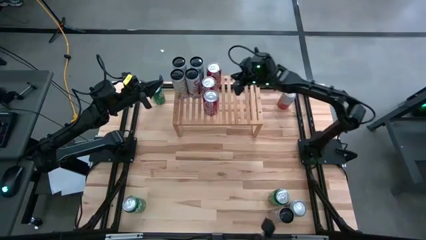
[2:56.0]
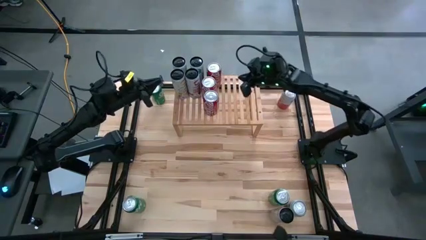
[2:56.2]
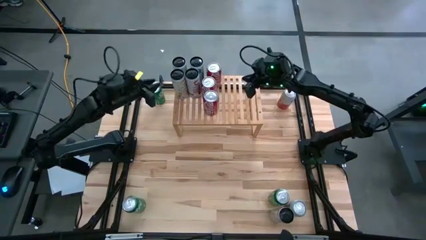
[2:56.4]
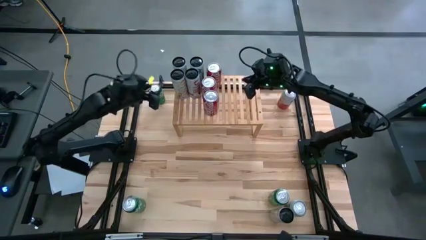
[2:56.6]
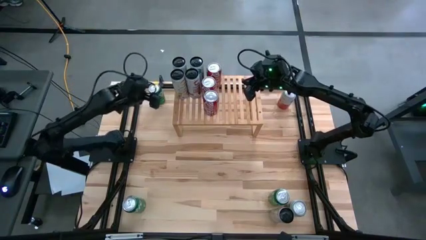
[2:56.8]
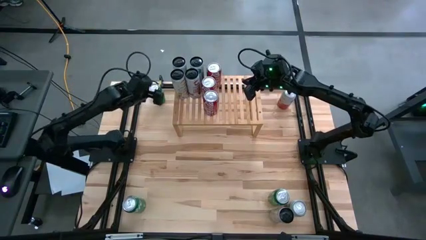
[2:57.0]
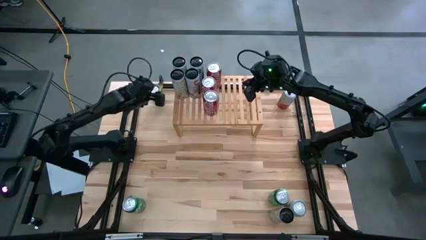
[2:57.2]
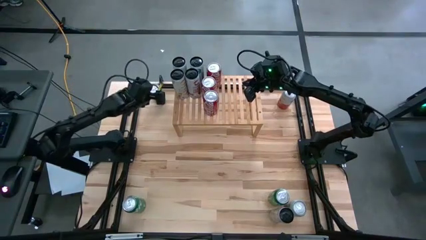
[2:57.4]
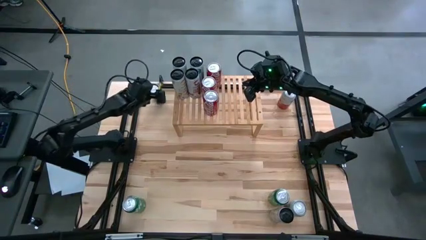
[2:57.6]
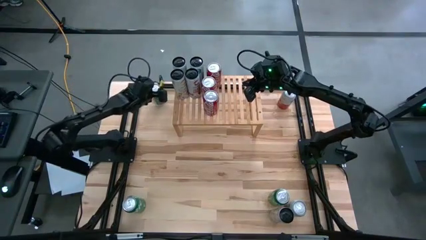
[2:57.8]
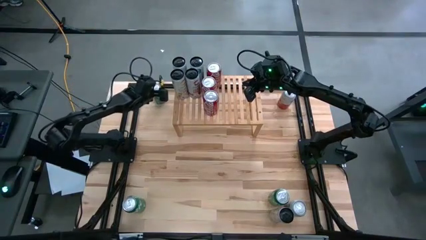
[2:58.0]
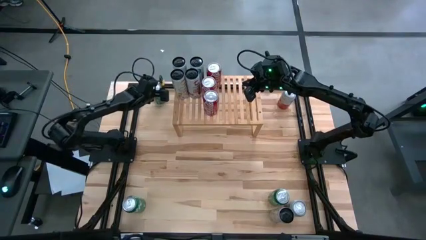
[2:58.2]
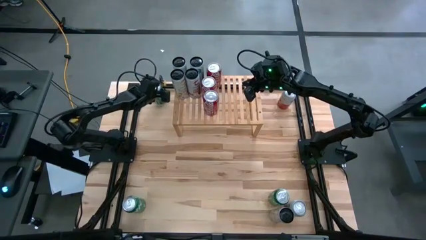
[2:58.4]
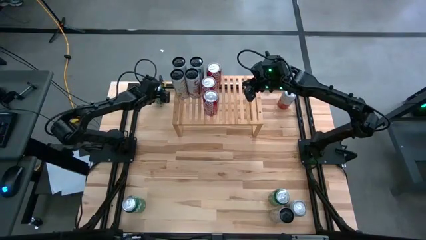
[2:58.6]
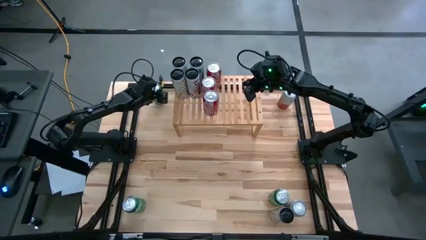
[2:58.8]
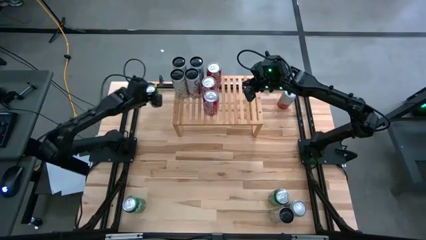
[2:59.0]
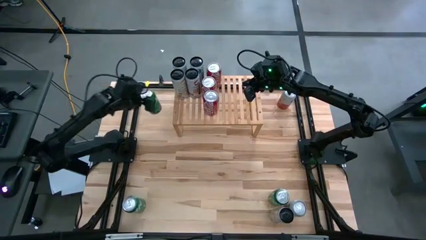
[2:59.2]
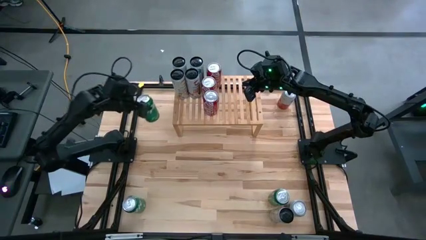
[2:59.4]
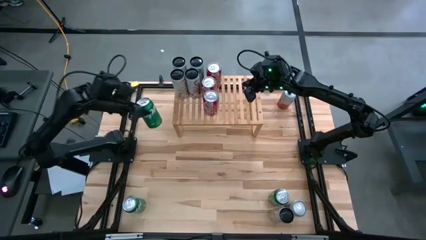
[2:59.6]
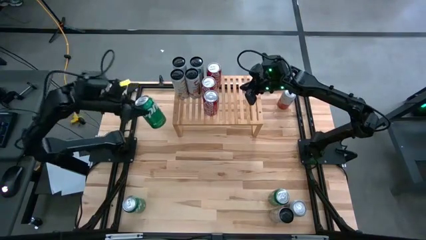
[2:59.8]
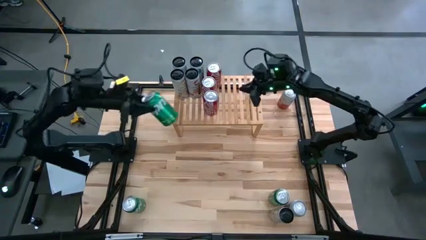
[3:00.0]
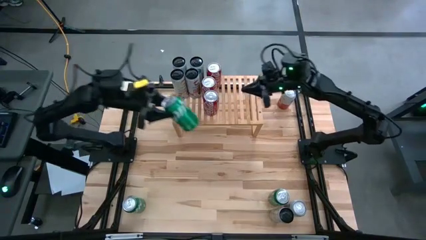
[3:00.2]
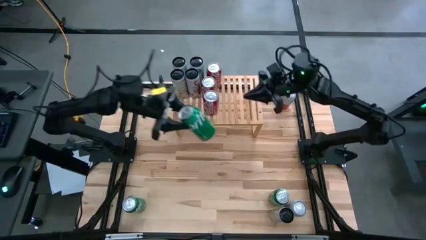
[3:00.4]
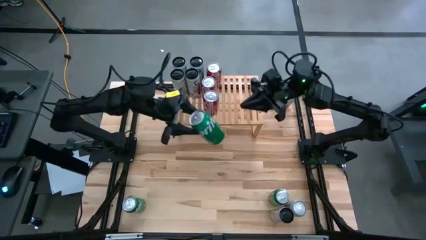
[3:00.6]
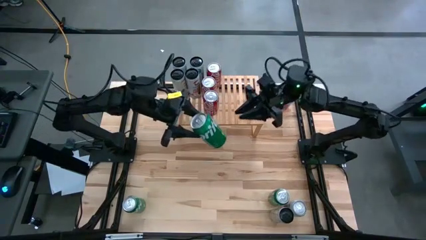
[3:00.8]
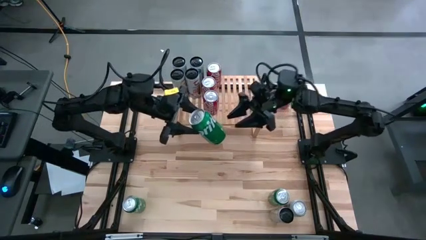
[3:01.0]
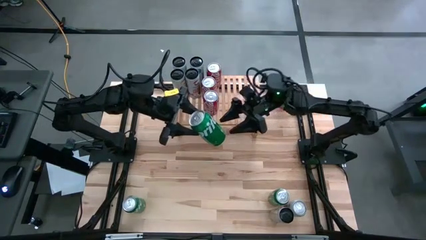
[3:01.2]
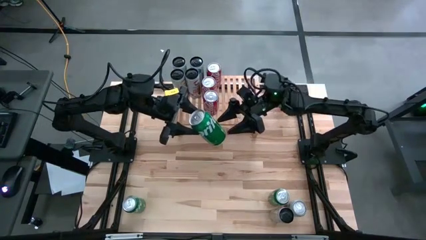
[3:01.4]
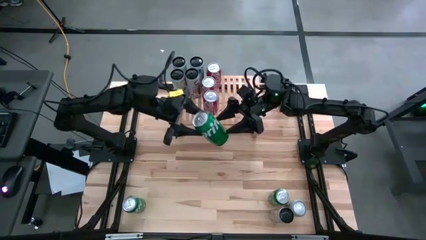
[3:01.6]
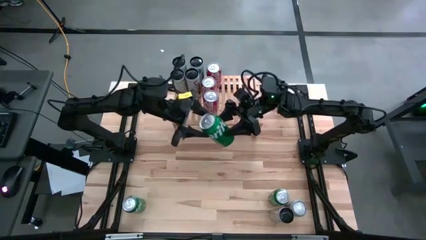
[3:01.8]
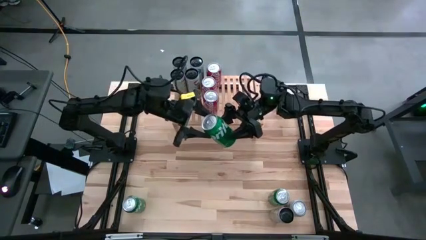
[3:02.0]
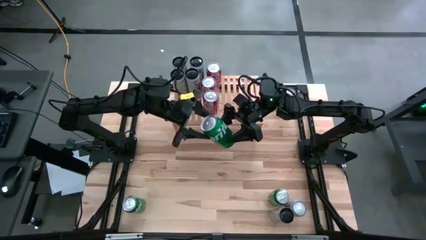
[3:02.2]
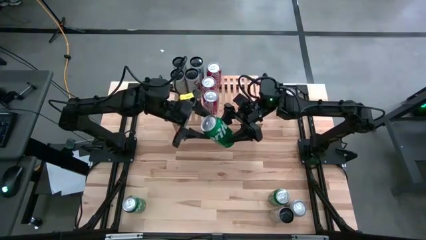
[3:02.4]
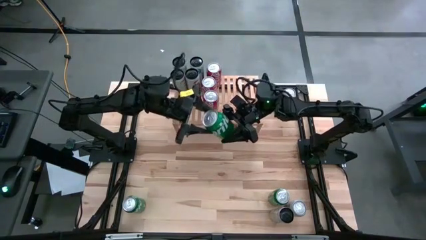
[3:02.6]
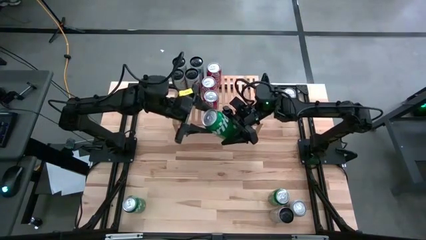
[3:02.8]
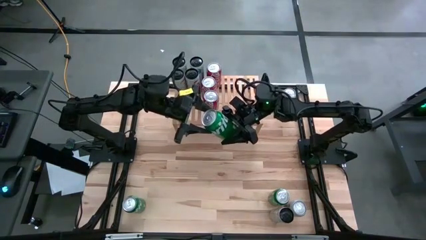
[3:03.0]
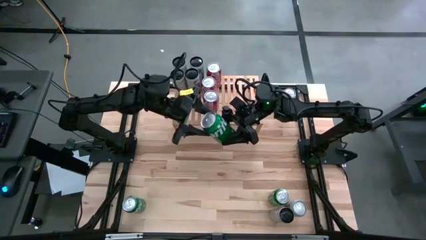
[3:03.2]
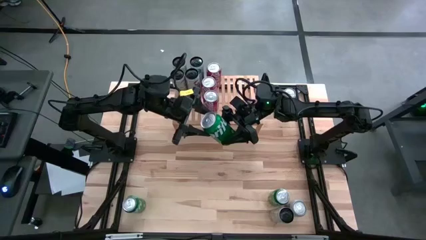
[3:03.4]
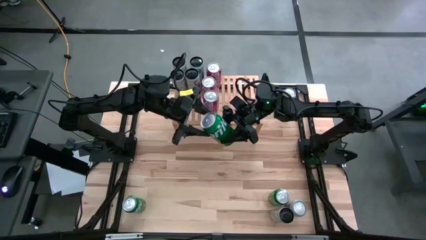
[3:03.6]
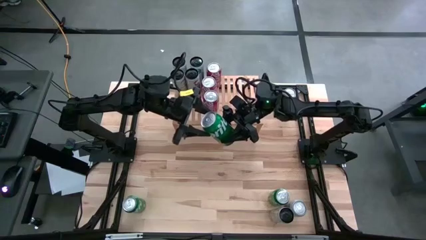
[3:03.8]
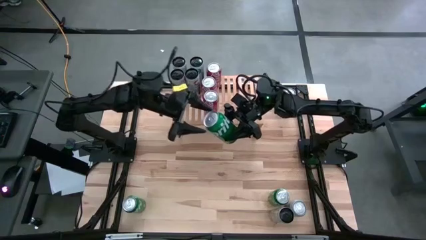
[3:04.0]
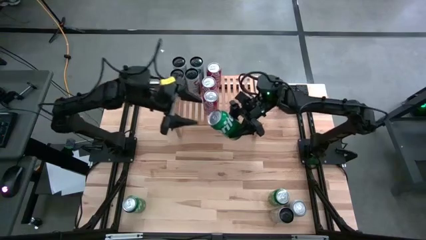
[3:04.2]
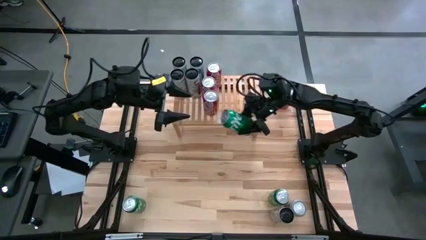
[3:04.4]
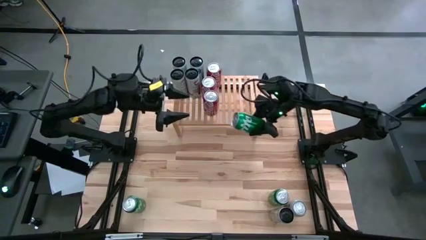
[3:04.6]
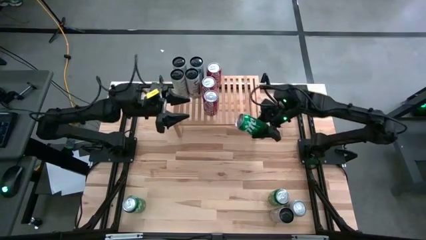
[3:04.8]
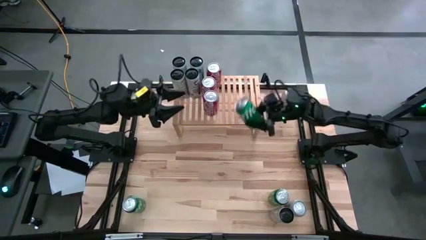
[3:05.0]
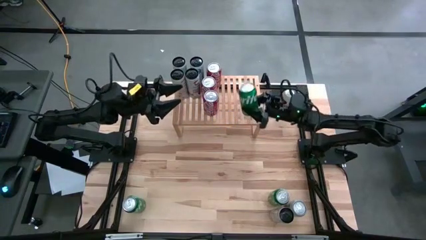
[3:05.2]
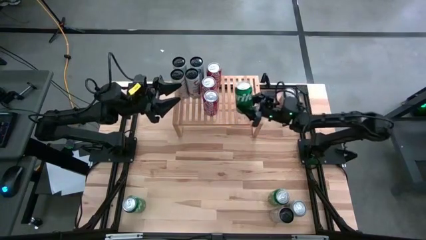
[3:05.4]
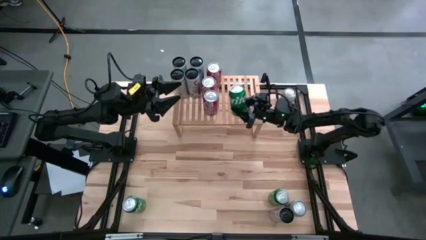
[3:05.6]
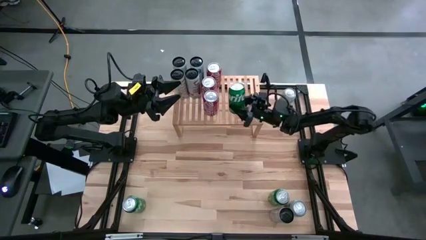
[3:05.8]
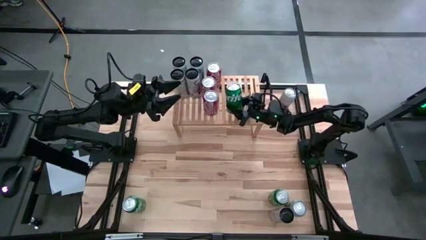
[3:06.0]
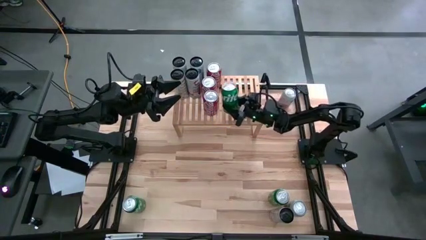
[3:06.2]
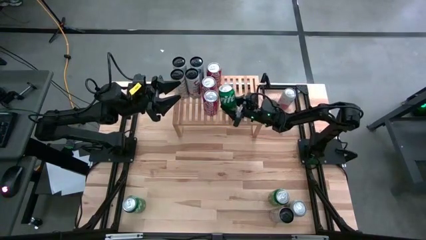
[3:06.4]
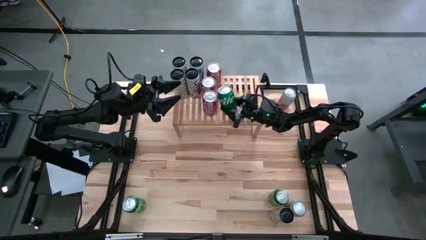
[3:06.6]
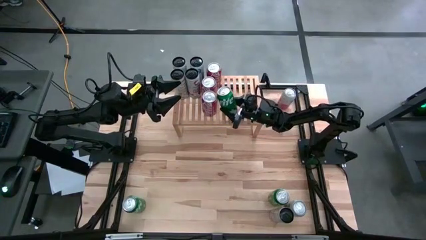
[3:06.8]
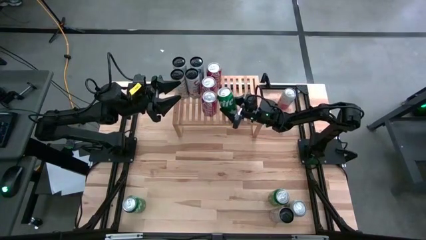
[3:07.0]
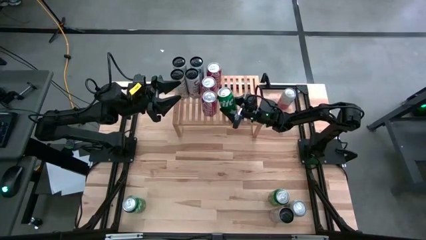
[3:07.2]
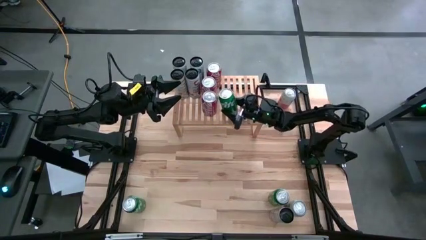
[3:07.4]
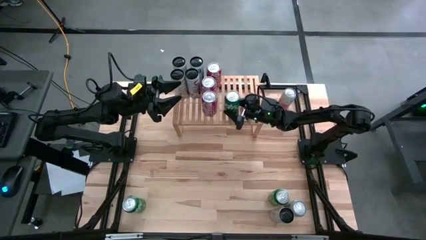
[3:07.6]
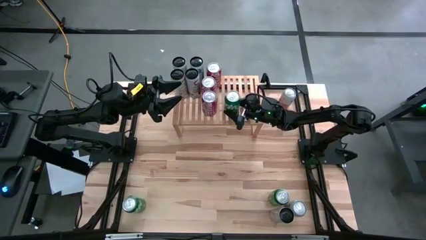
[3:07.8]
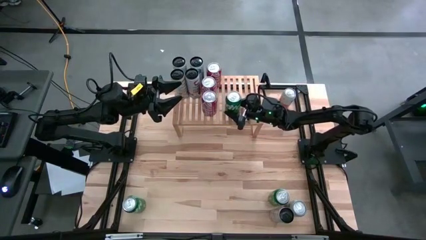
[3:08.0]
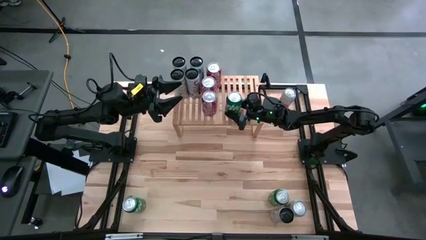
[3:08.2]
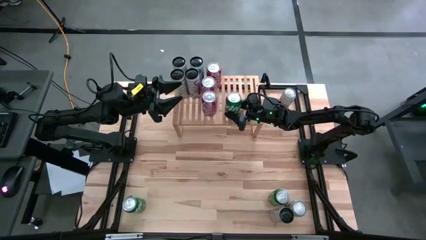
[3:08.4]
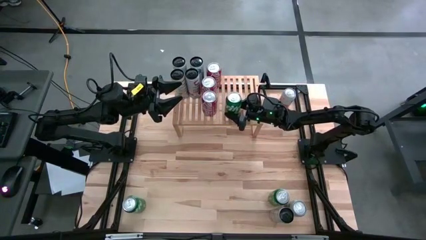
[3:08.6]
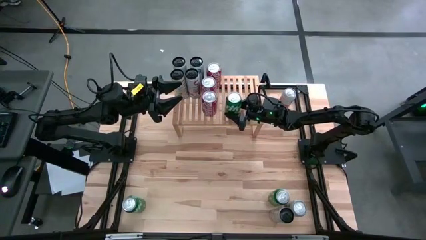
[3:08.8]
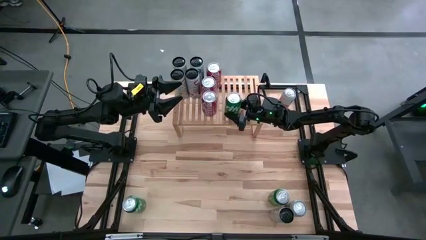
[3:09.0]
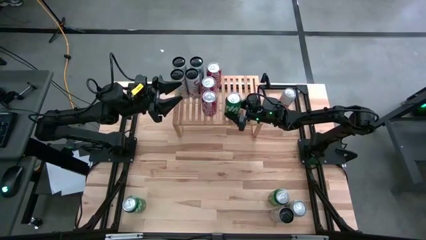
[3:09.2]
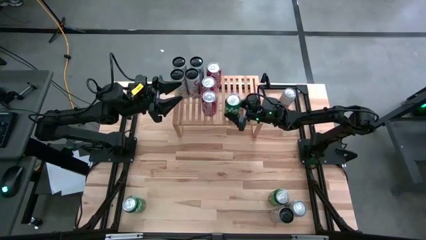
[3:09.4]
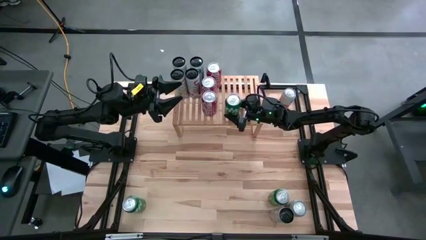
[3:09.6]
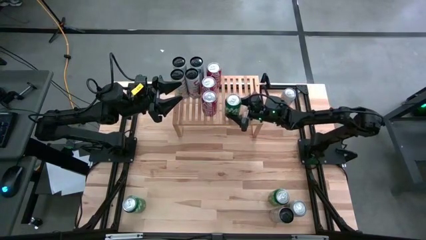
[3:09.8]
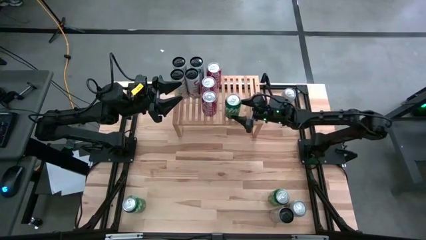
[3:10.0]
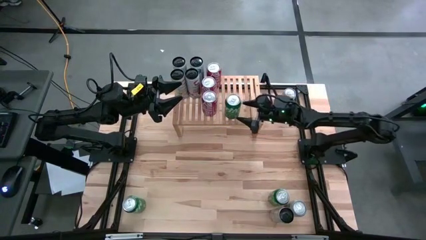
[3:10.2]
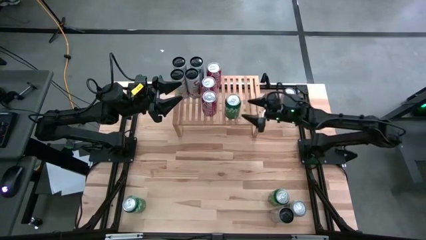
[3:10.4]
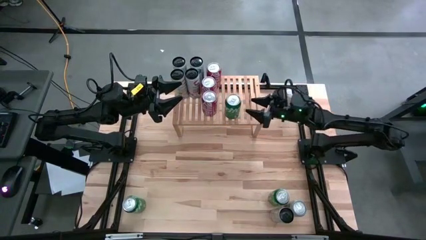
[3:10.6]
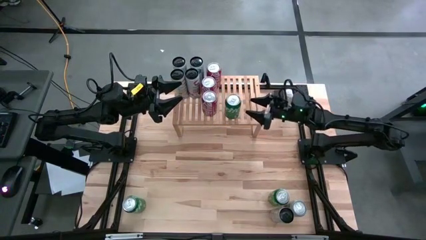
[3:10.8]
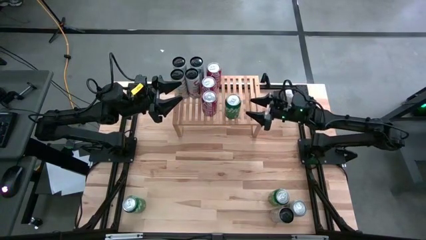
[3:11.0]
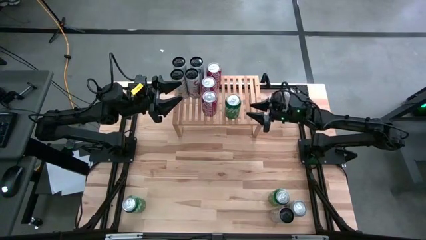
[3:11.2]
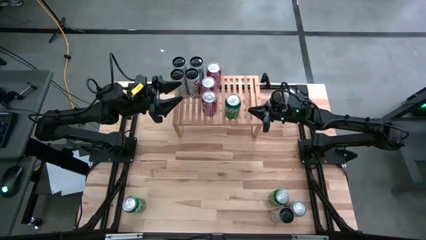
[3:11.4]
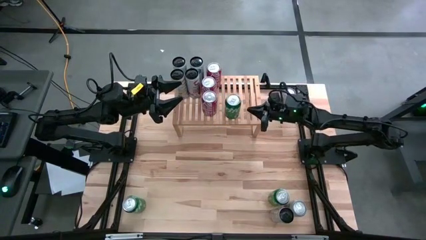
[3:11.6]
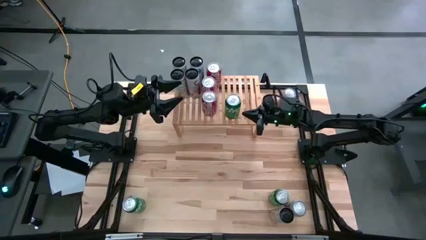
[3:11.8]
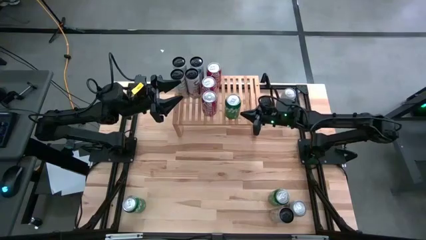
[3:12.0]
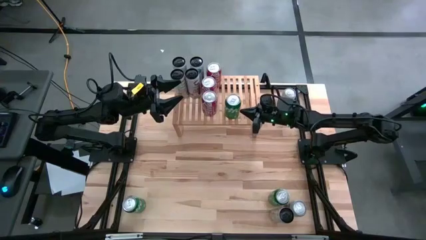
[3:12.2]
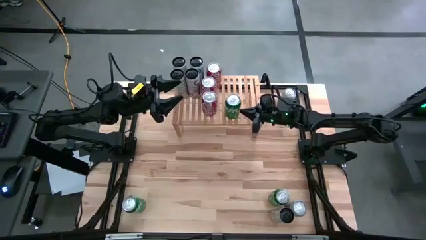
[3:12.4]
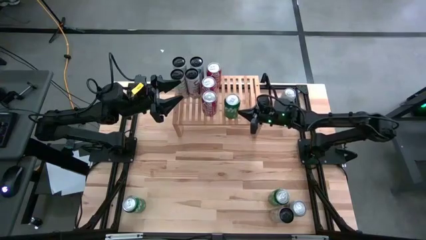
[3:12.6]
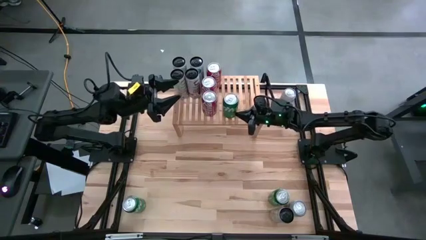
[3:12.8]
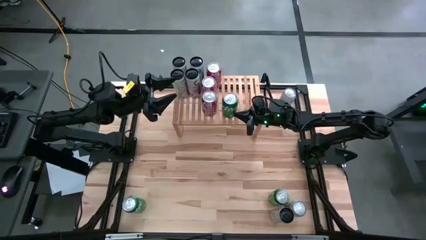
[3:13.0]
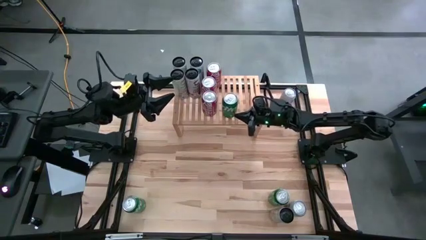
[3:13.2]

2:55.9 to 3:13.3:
Task: Place canned beverage on shelf
Put the top green soda can on the shelf
